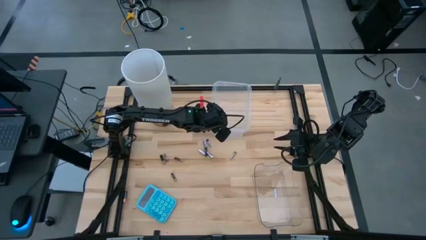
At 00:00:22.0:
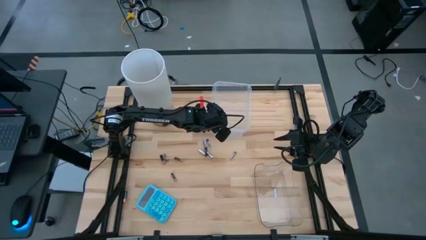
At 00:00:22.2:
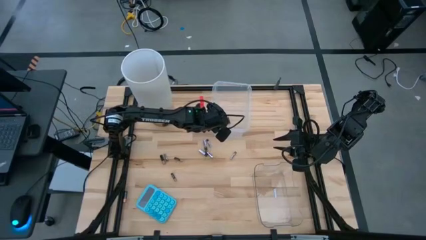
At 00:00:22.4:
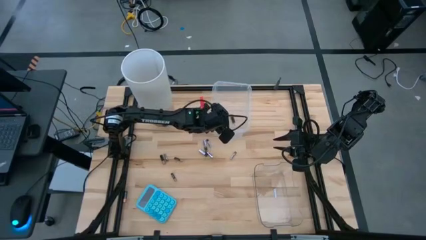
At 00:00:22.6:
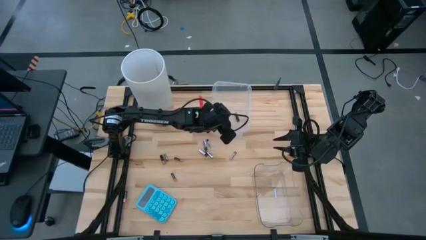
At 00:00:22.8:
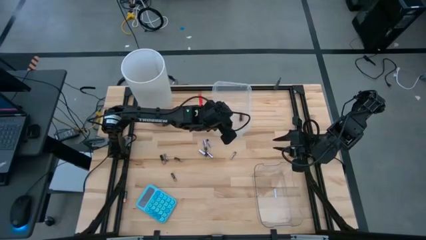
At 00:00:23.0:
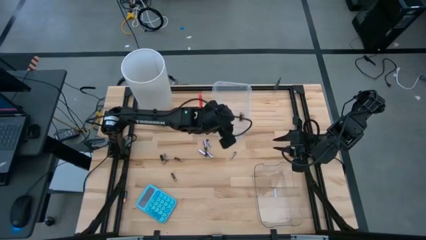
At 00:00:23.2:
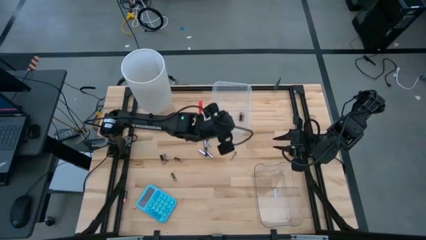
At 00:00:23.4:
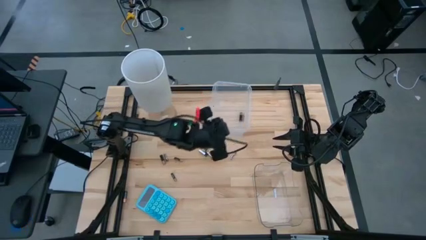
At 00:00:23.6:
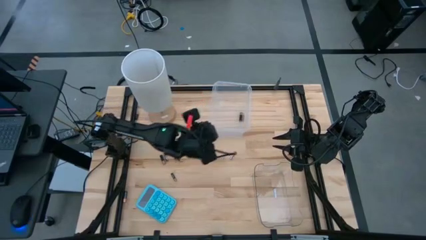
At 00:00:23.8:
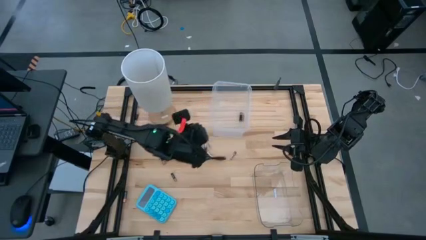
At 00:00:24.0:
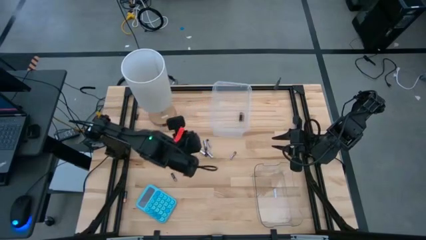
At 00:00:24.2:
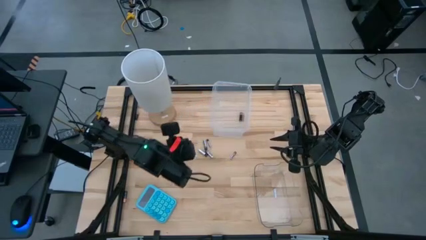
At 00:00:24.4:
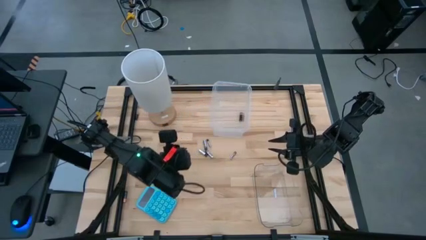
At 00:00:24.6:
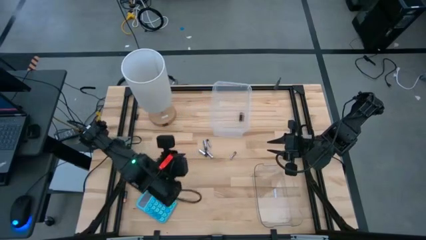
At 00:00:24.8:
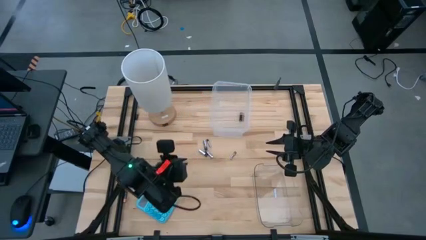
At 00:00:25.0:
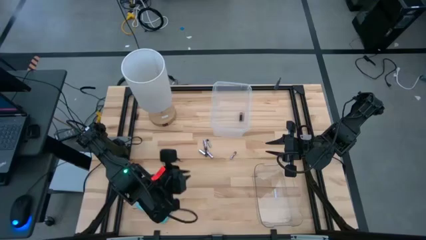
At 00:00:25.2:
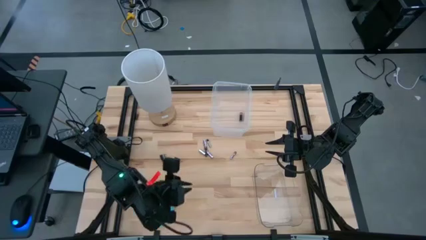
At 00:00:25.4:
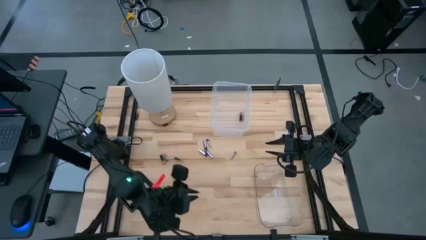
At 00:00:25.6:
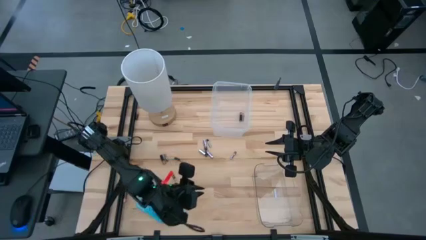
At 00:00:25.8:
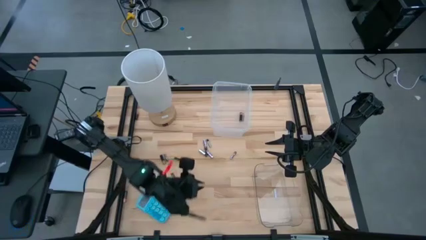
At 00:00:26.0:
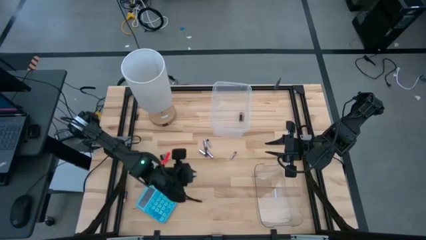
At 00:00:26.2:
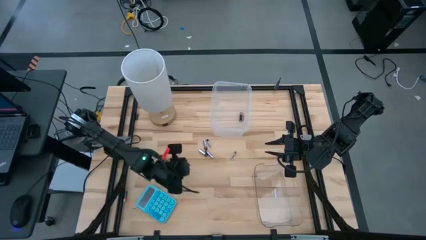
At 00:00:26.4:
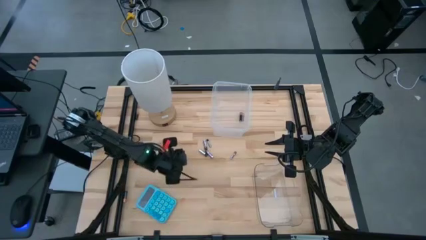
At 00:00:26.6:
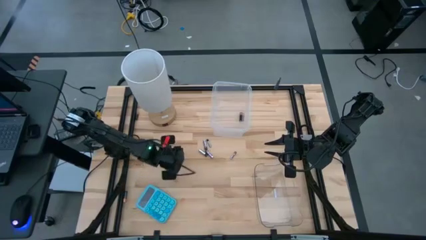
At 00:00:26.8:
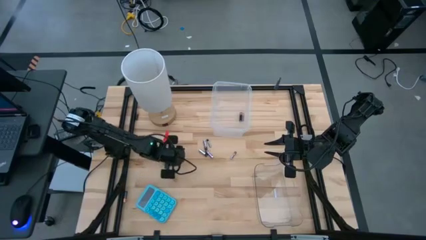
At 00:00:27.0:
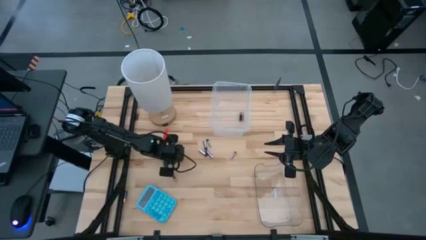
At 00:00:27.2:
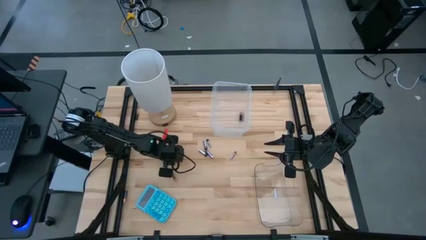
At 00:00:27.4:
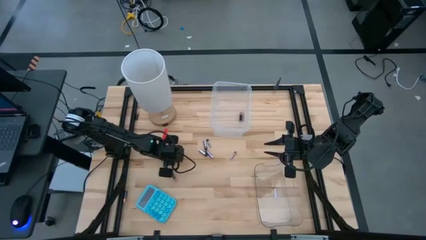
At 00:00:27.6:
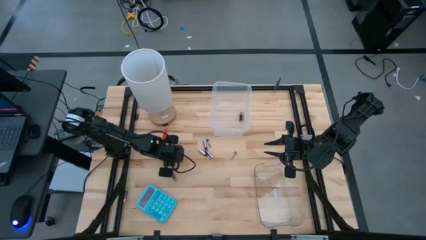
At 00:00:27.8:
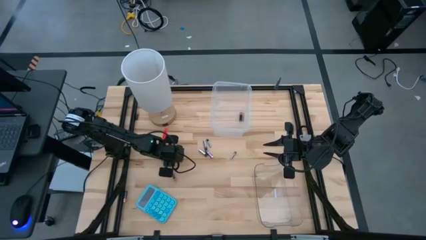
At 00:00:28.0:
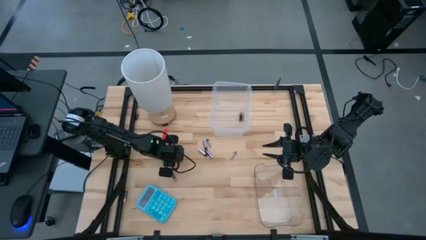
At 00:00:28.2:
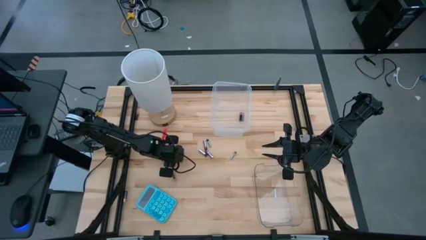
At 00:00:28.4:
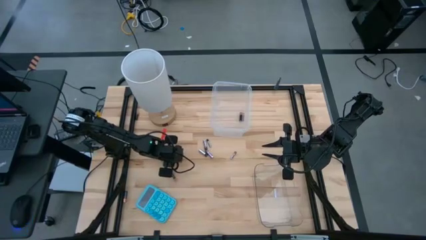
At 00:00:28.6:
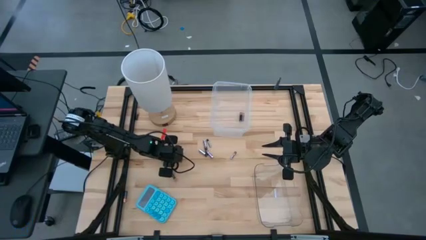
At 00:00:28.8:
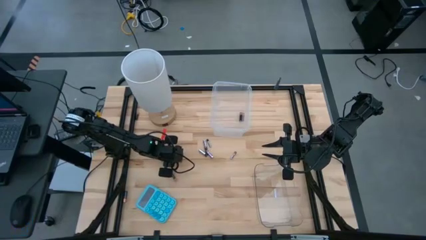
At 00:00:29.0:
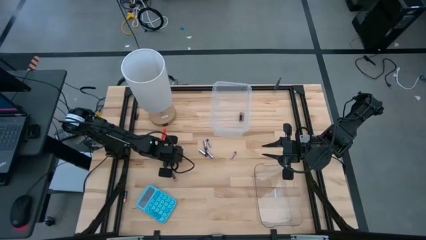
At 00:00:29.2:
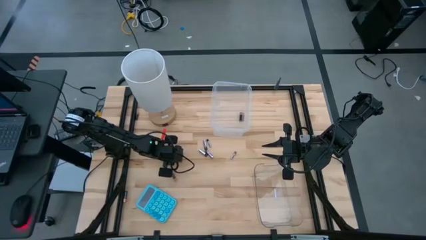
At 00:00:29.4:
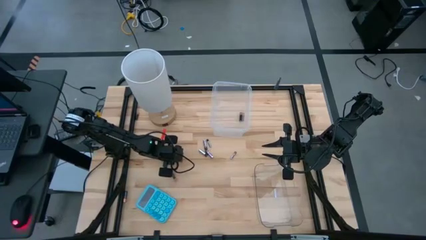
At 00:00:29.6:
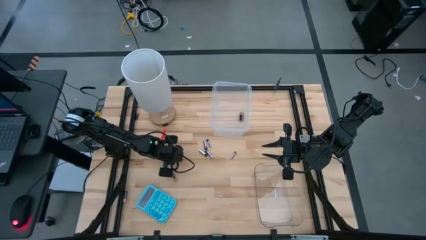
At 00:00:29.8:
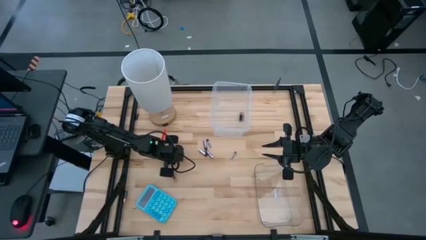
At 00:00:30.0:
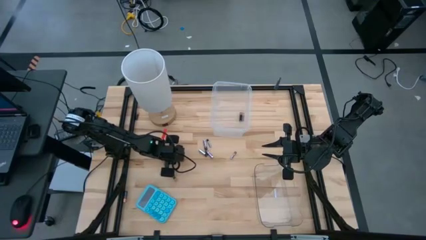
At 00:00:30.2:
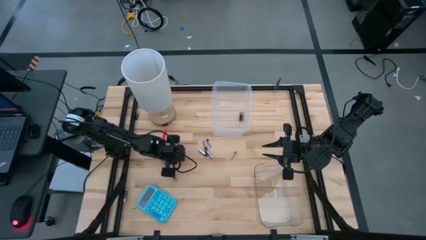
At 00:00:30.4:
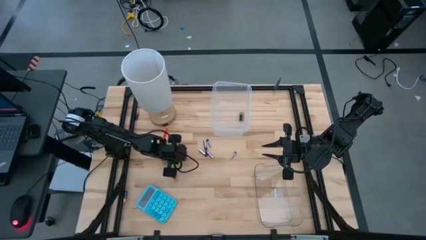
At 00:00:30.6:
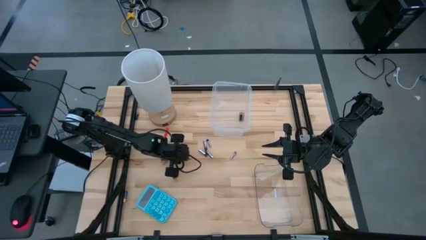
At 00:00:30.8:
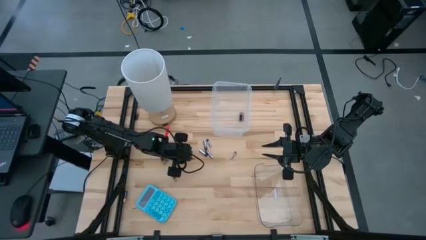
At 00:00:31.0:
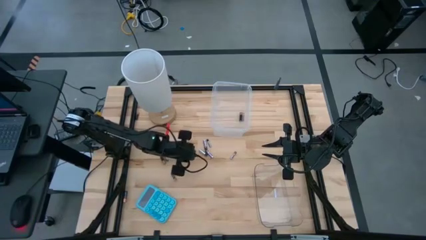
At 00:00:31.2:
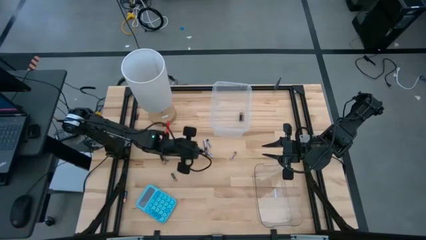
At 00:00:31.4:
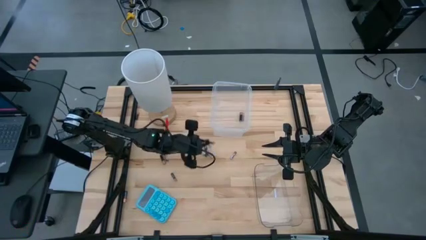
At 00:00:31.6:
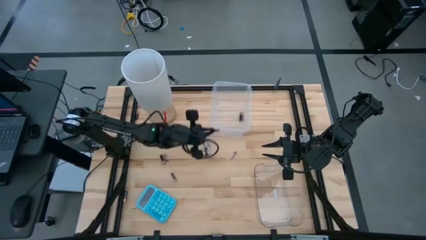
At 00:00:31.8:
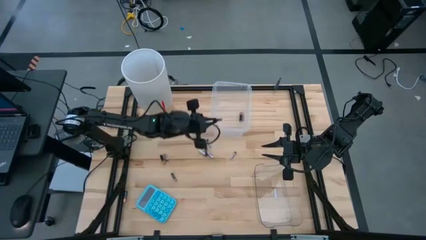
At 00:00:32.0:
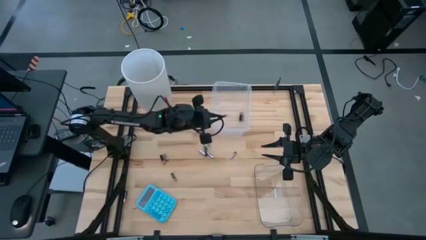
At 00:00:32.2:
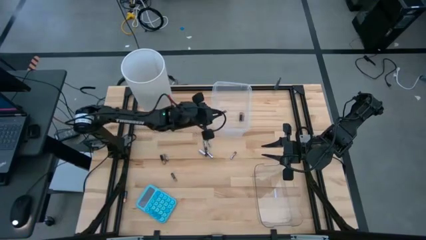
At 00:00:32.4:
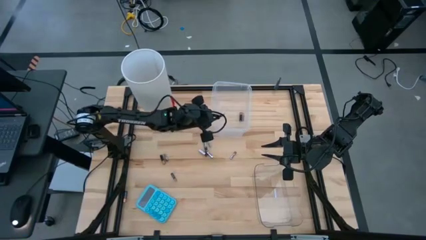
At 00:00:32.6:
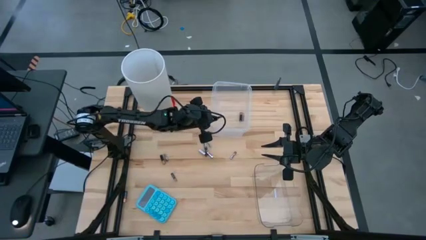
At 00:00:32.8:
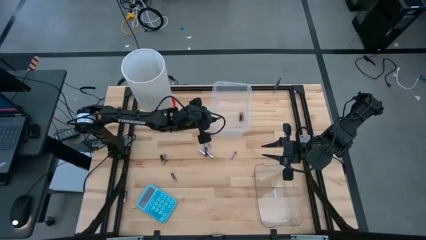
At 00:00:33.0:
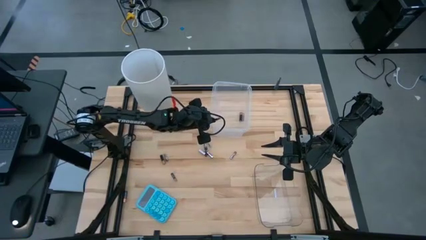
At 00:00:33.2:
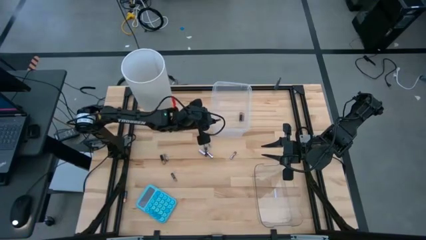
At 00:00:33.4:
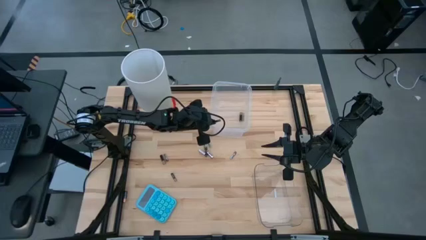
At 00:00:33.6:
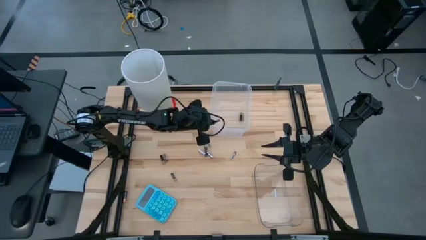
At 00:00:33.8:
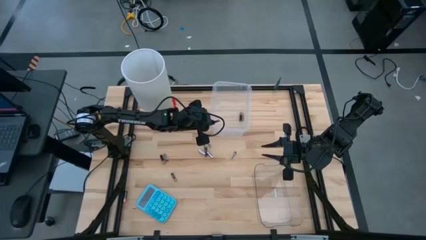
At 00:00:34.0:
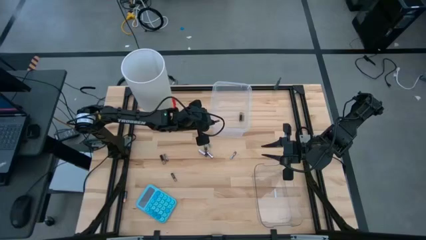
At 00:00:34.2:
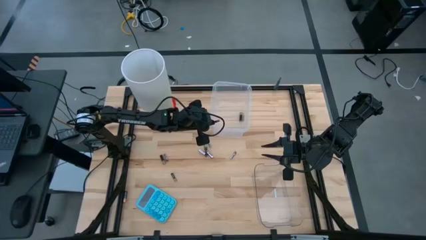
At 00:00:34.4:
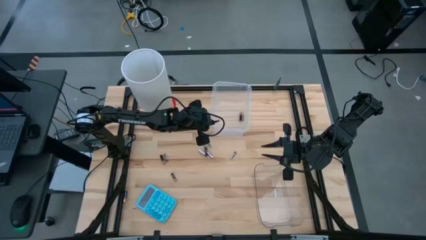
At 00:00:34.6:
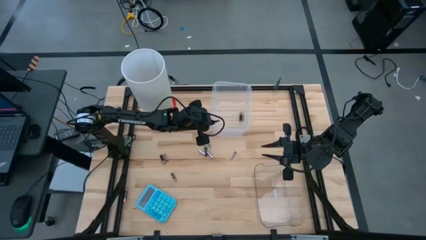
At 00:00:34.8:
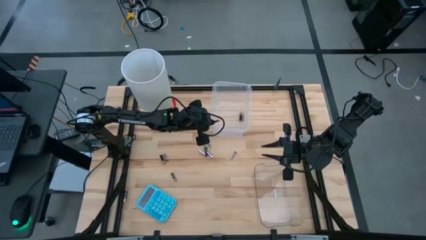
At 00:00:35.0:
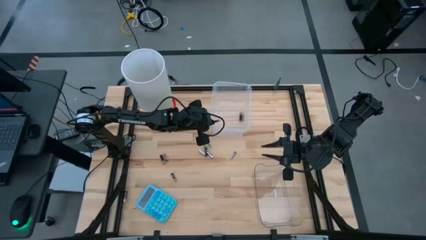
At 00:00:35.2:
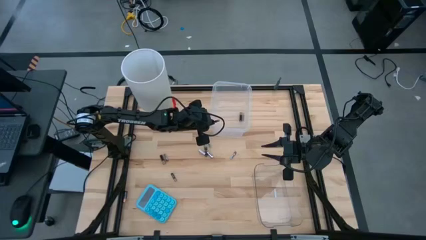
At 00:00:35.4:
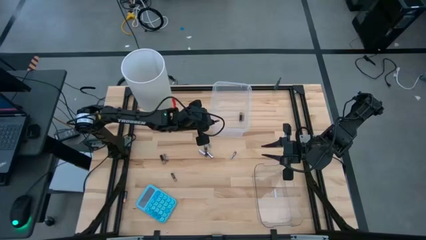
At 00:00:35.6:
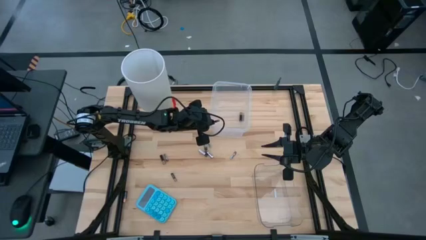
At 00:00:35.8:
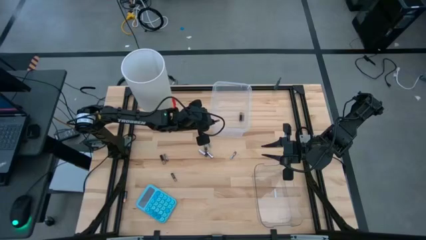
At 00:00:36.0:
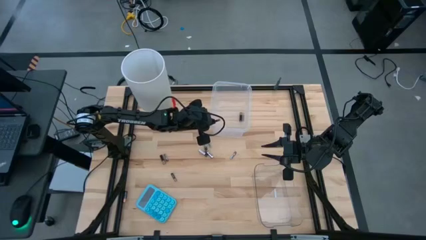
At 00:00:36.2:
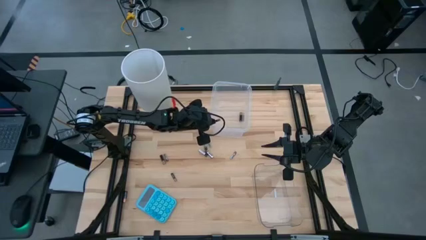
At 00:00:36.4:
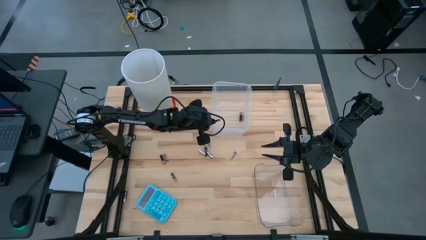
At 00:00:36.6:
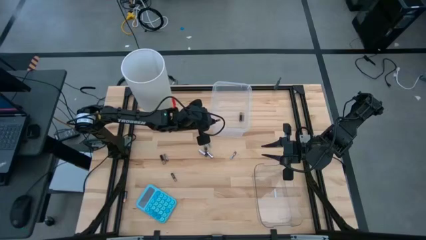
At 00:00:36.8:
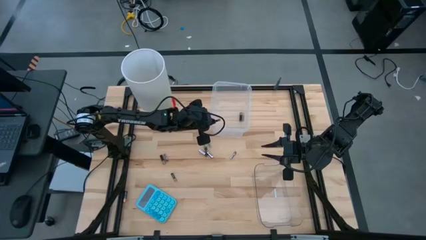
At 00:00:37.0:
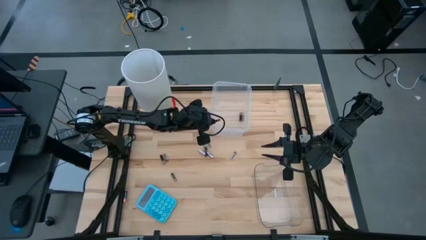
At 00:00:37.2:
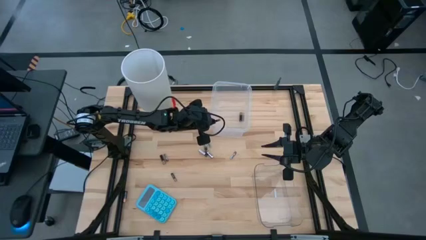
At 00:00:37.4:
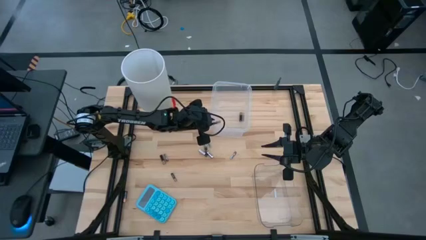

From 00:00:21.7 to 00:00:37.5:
Task: Sort batteries
Put the brown battery into the top transparent bin
